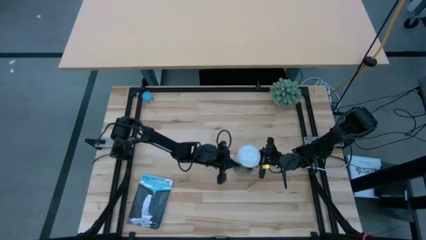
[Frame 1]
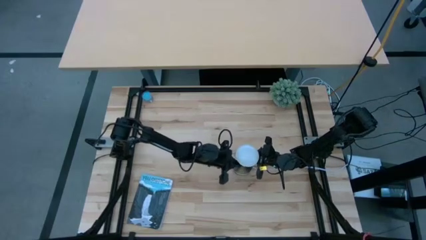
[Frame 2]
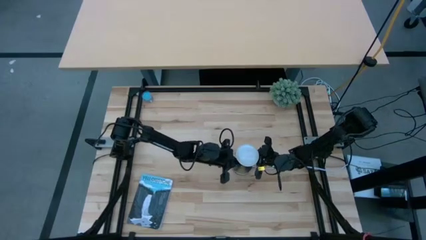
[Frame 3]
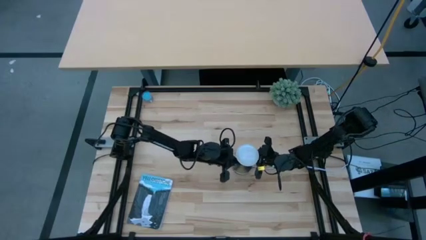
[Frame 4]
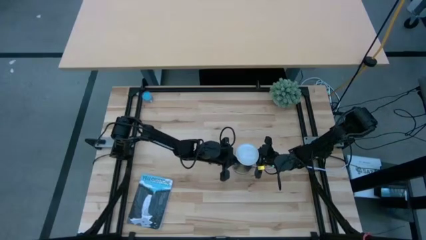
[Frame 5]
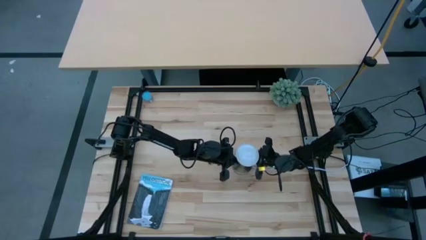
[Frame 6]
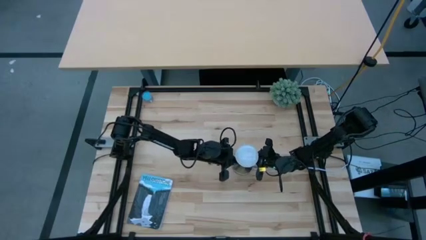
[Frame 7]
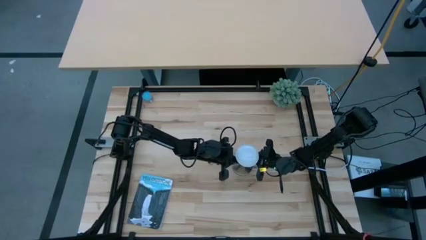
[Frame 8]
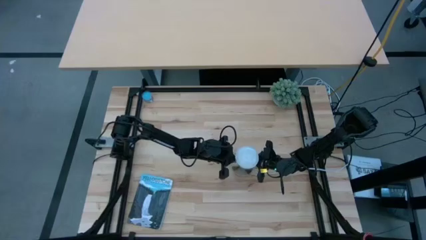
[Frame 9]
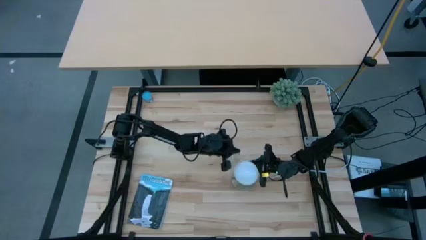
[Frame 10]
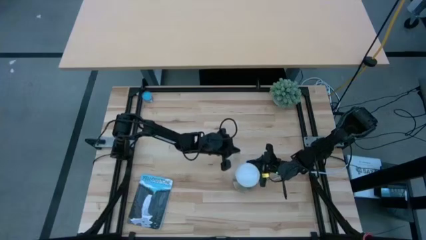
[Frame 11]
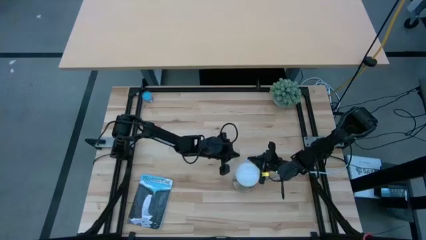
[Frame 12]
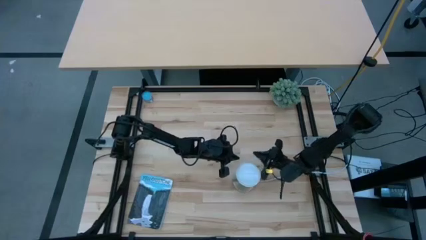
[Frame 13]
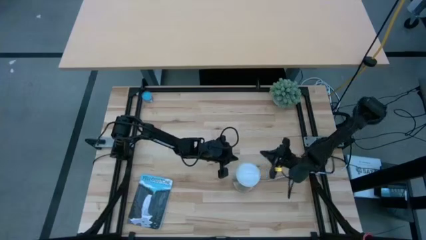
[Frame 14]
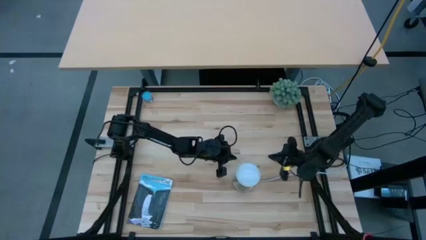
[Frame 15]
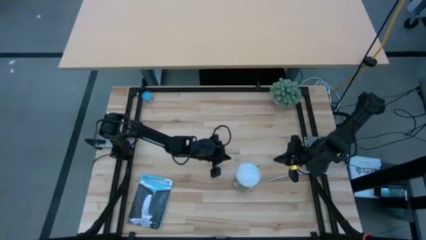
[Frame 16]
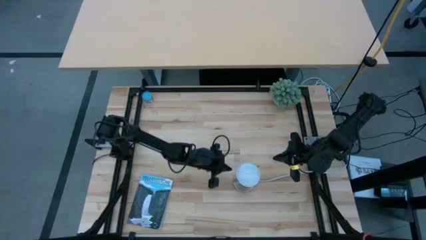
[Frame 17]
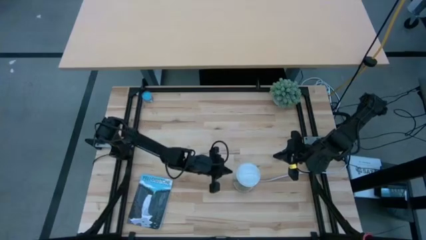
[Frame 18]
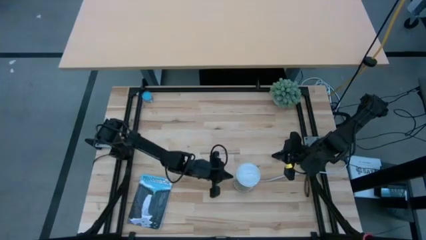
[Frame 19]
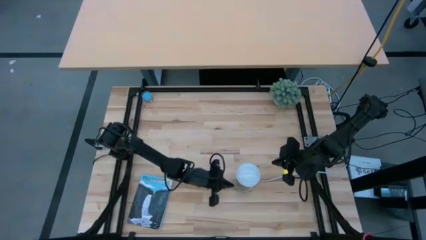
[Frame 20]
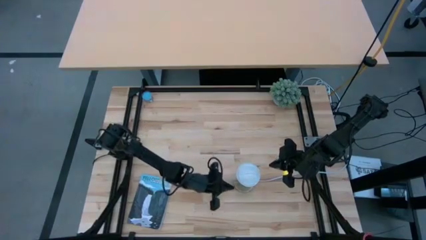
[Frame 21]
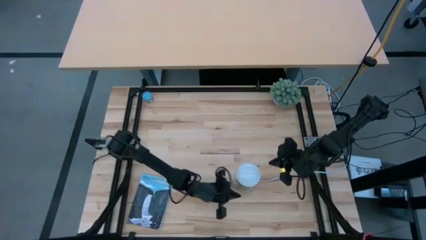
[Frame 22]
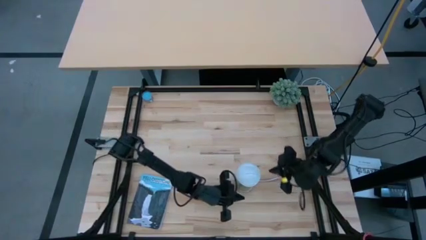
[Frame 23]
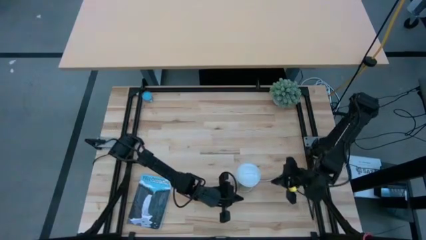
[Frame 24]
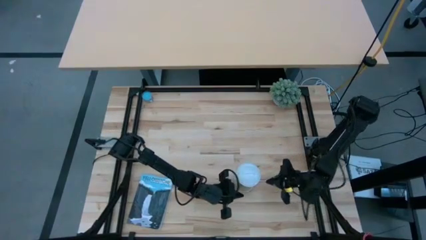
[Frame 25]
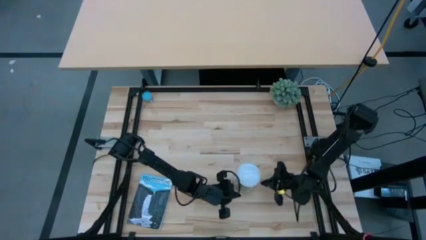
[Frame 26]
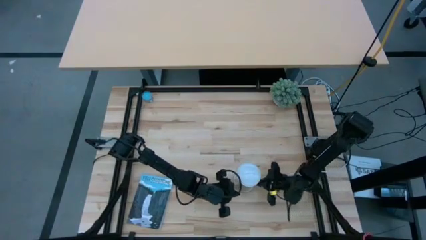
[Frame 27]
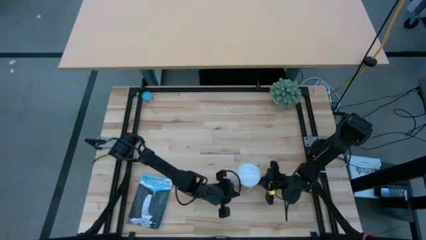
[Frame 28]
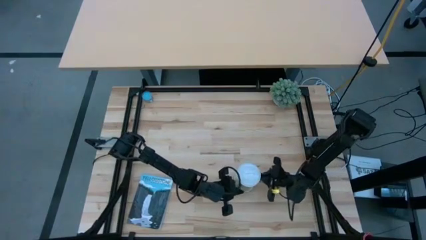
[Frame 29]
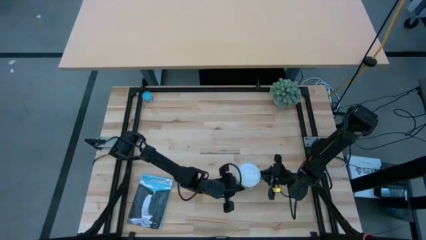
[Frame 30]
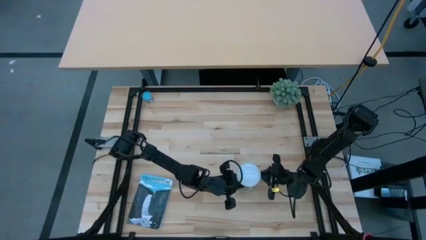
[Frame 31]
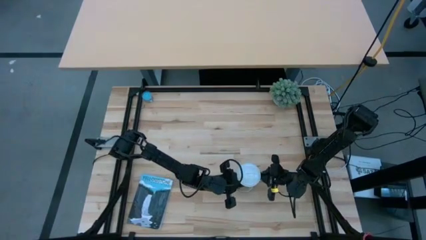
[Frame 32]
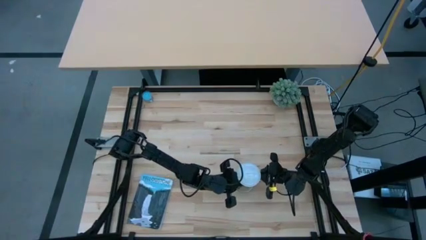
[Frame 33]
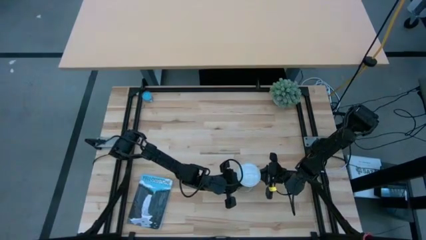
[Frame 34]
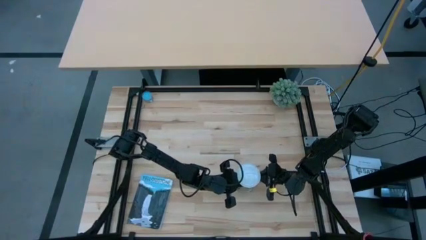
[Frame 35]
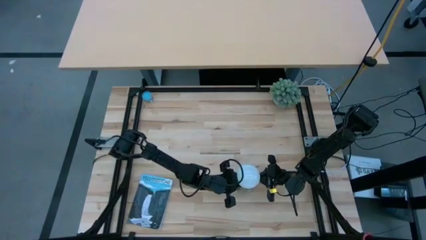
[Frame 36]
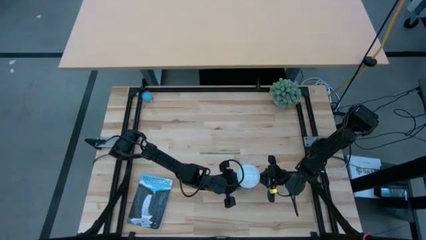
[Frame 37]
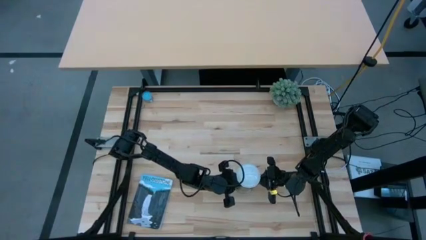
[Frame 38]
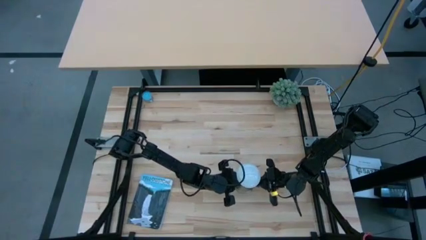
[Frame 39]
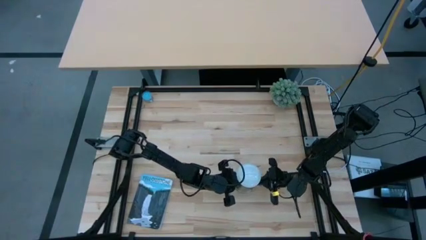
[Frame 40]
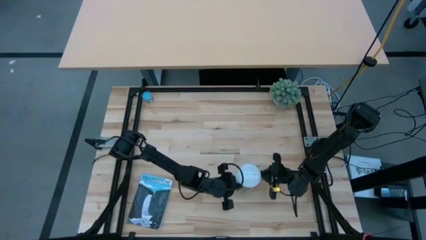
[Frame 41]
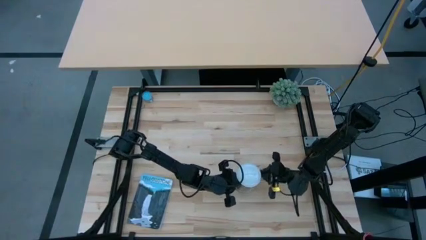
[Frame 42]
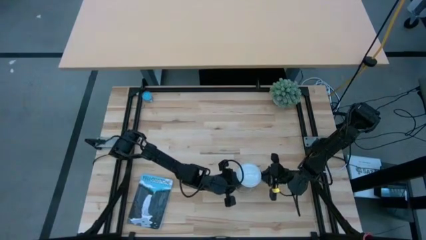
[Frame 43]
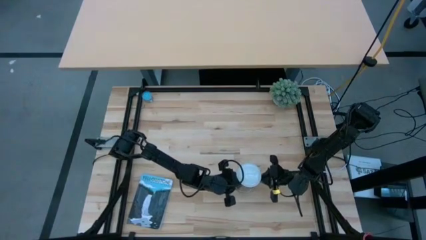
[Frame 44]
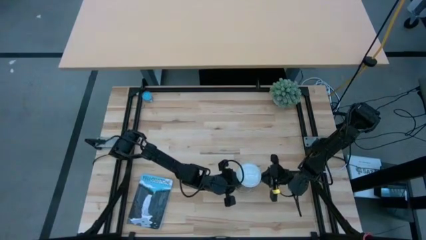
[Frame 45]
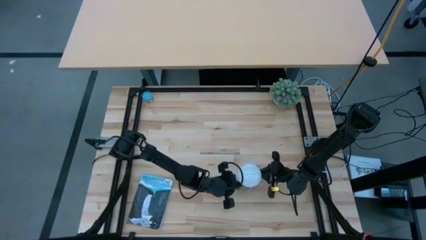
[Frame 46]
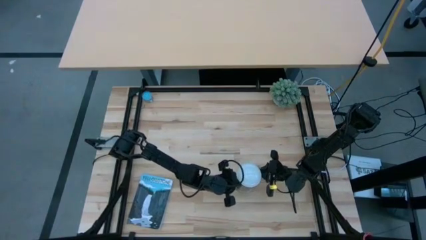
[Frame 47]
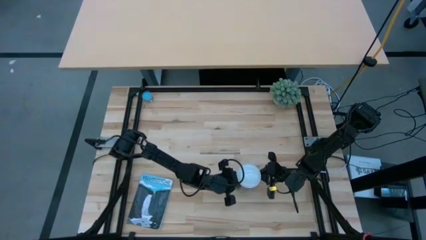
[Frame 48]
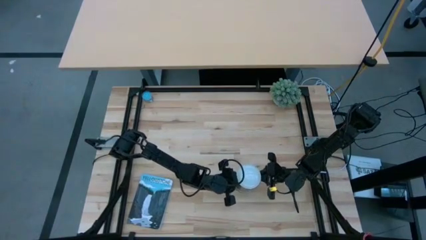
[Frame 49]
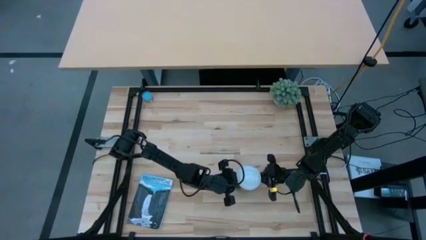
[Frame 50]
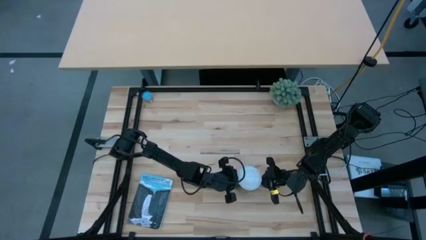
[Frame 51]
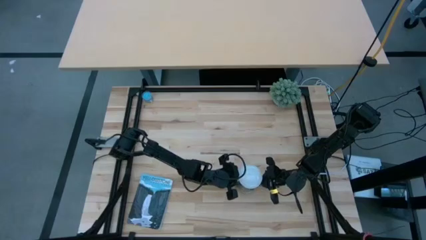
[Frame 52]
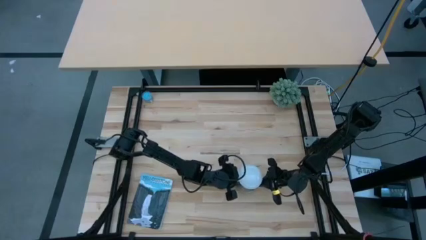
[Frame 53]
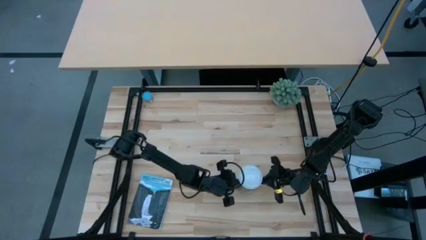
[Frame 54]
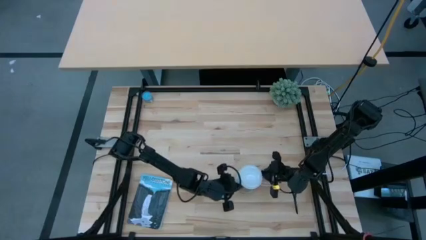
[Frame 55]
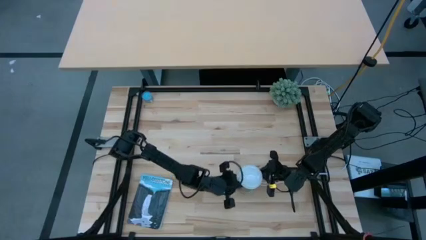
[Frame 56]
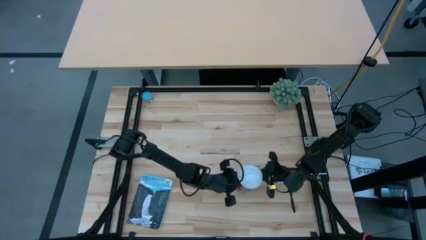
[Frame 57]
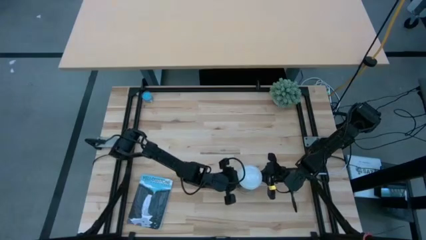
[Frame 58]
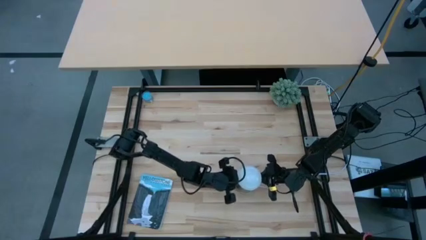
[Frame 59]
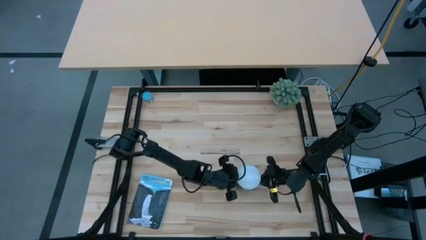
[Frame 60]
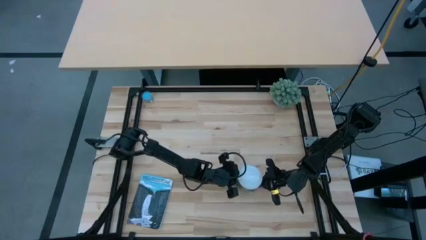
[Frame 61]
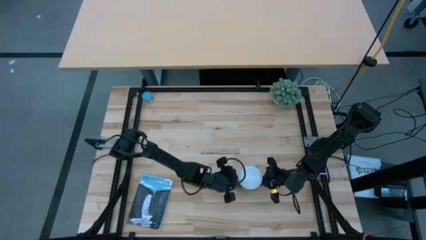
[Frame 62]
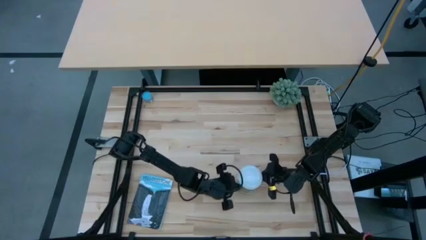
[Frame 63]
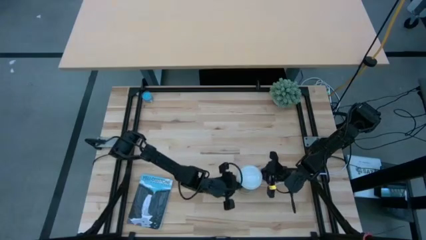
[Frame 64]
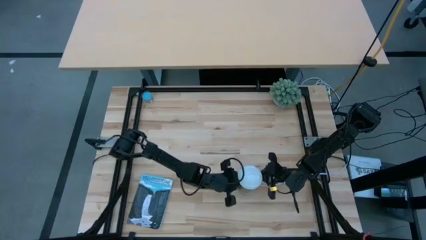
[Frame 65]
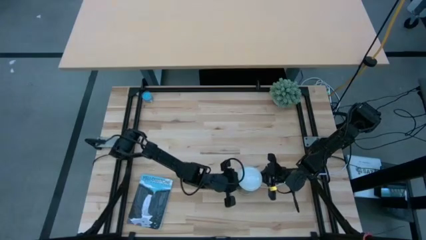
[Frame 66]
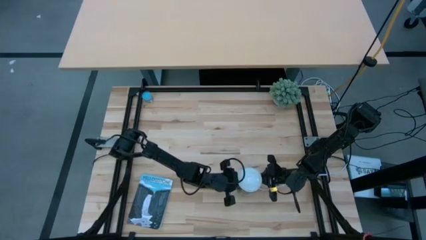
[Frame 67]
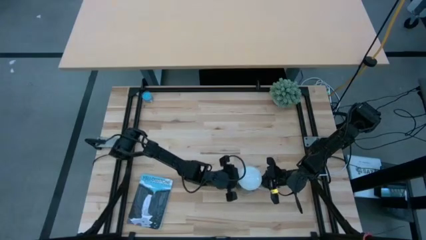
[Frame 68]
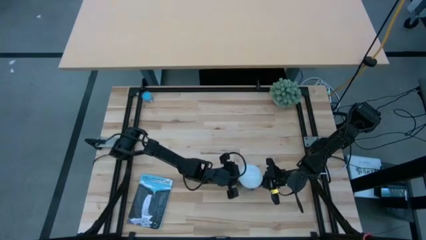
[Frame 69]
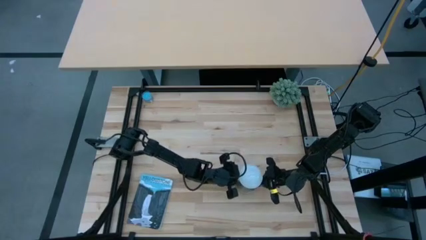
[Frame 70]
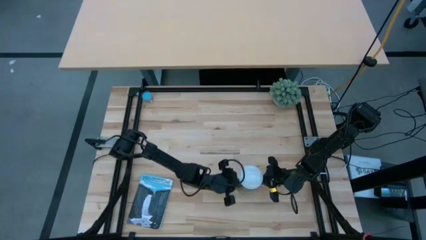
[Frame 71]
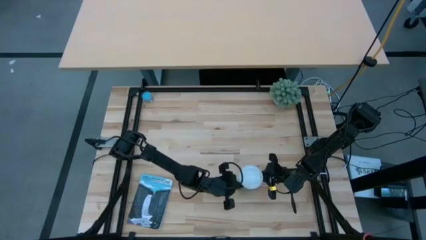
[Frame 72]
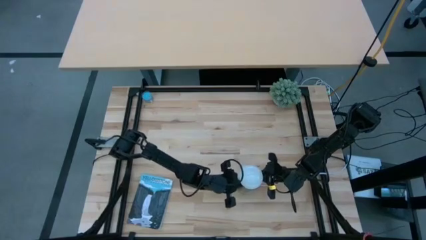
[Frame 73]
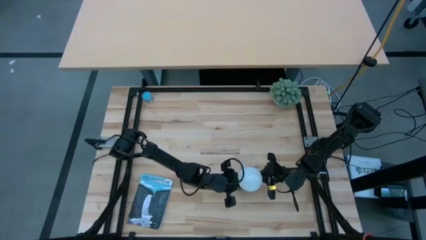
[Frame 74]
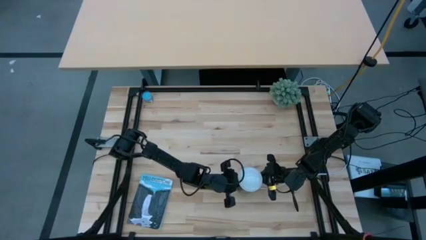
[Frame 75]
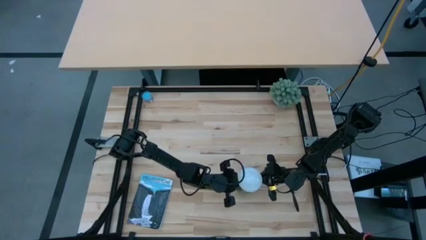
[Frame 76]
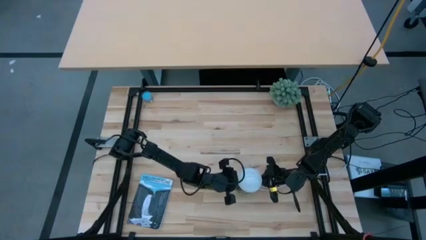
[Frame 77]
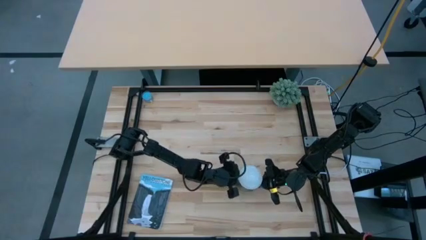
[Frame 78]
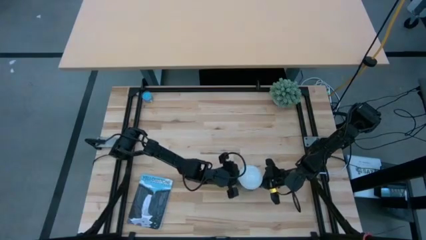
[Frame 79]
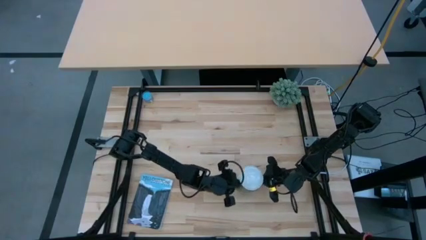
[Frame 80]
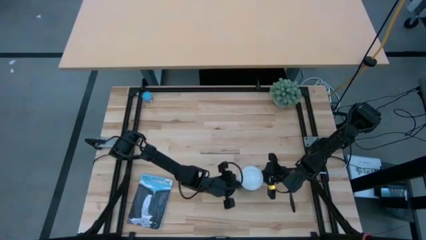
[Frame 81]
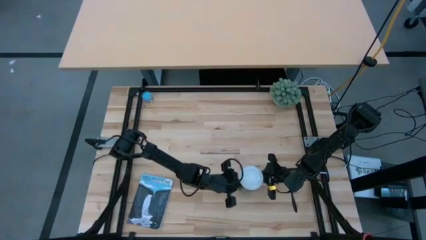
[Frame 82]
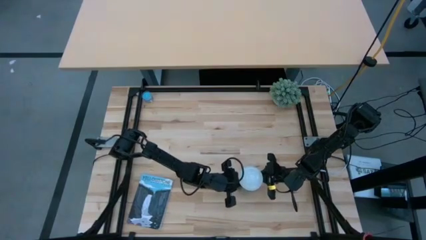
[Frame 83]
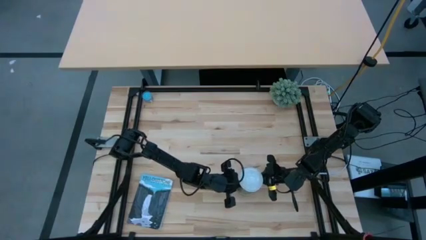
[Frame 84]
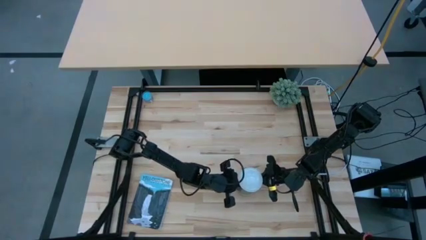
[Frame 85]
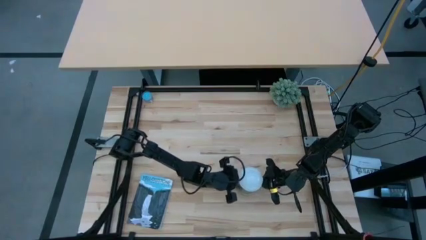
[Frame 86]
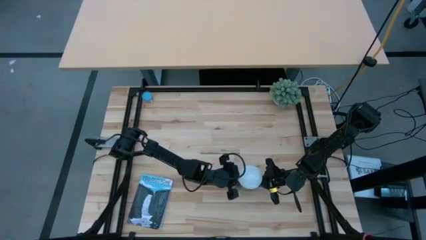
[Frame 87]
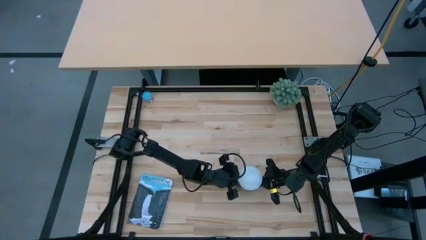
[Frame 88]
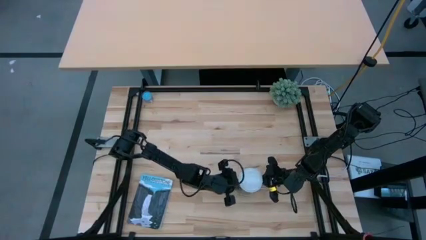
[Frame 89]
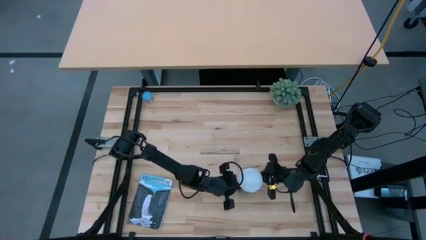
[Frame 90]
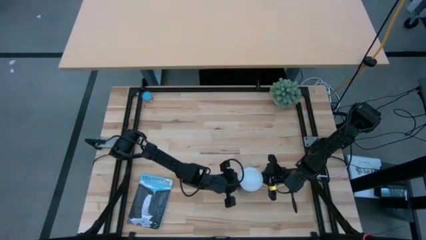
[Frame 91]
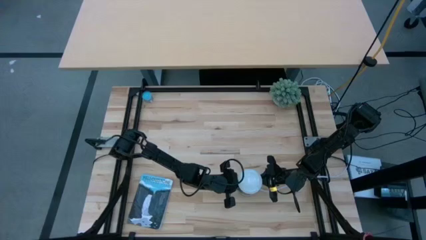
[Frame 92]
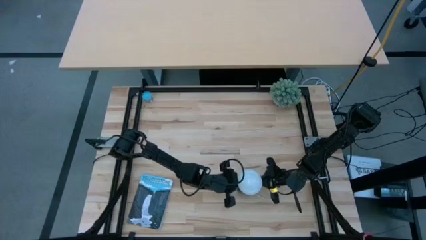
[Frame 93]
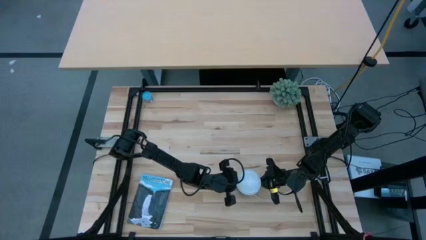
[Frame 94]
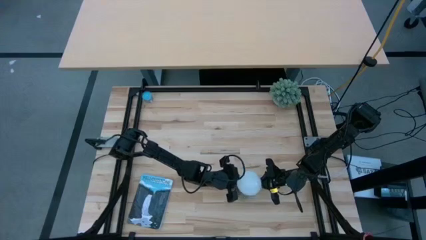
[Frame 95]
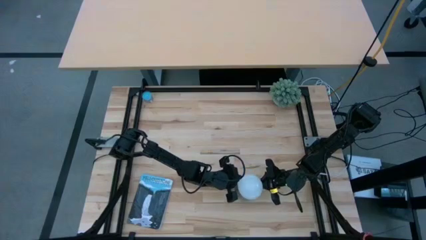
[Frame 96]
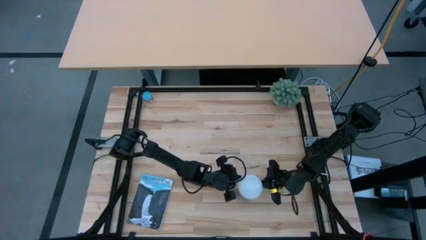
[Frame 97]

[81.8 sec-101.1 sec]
Task: Screw lightbulb
Insert the lightbulb into the bronze lamp socket
